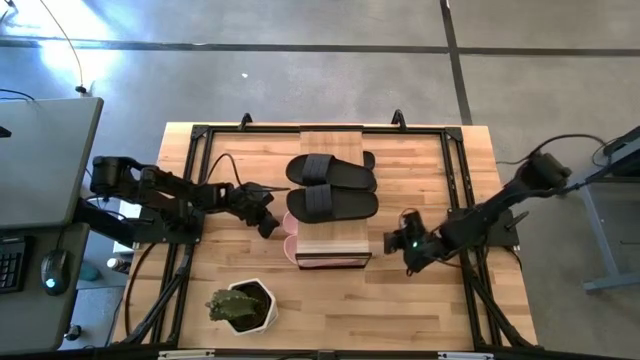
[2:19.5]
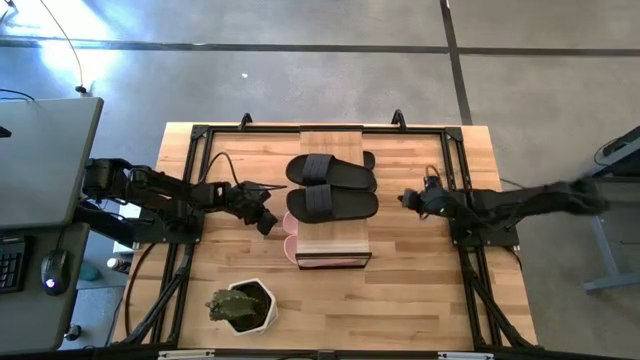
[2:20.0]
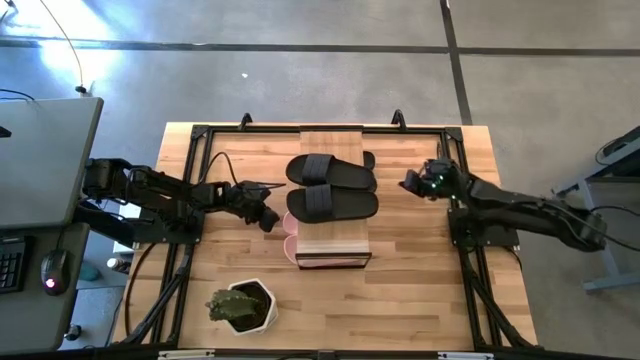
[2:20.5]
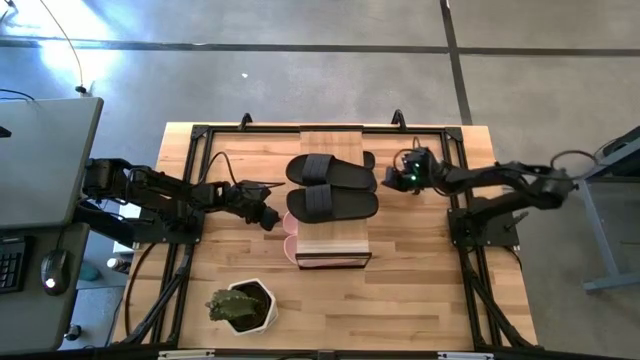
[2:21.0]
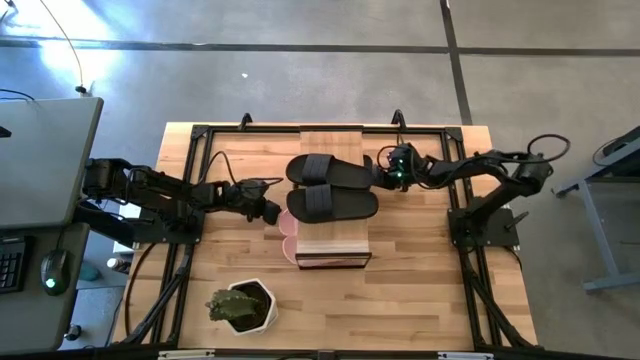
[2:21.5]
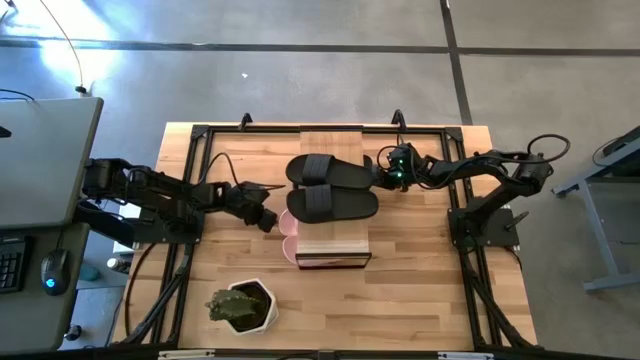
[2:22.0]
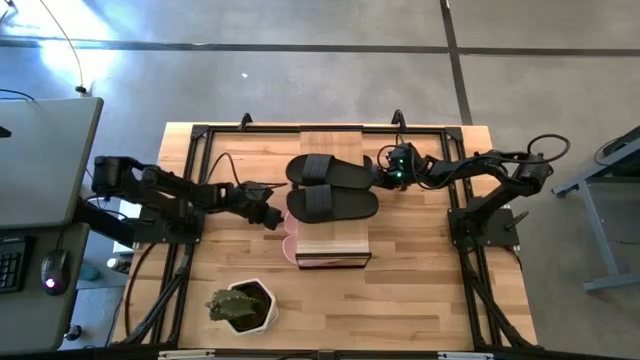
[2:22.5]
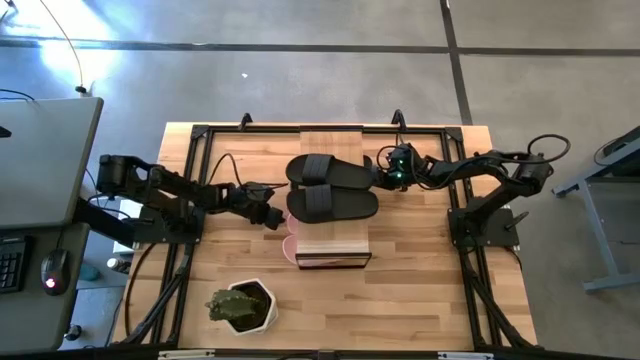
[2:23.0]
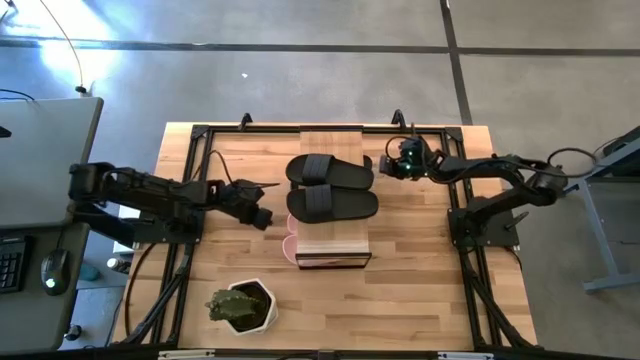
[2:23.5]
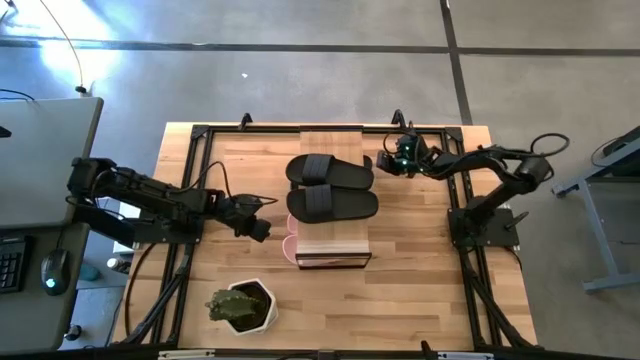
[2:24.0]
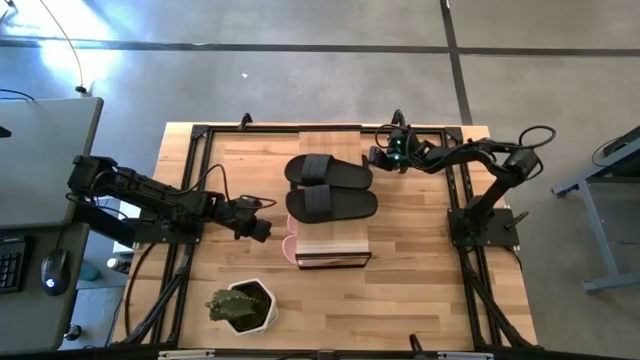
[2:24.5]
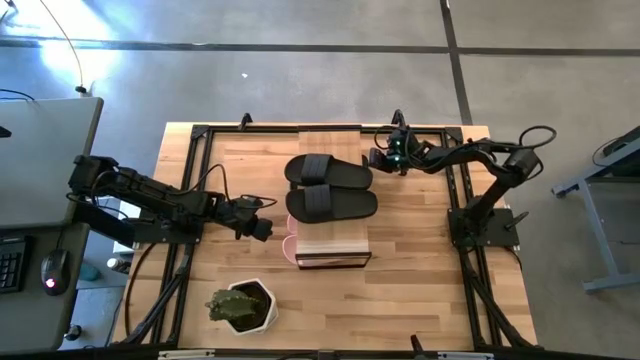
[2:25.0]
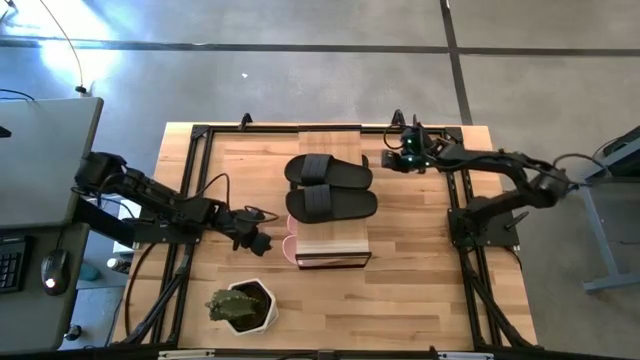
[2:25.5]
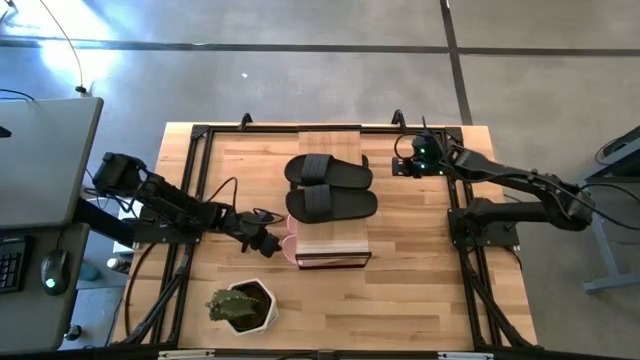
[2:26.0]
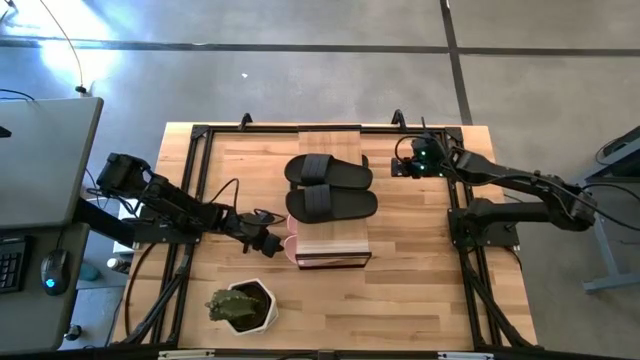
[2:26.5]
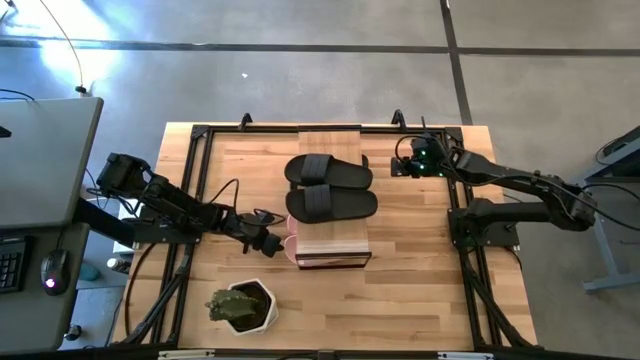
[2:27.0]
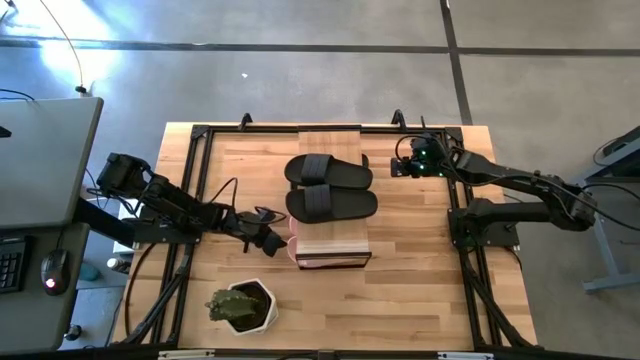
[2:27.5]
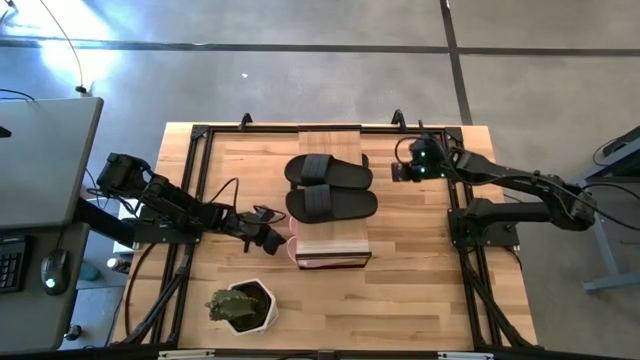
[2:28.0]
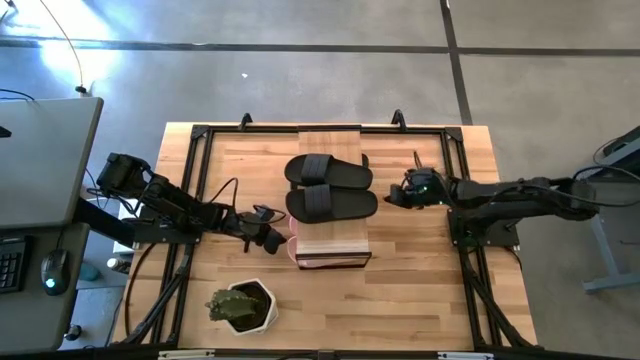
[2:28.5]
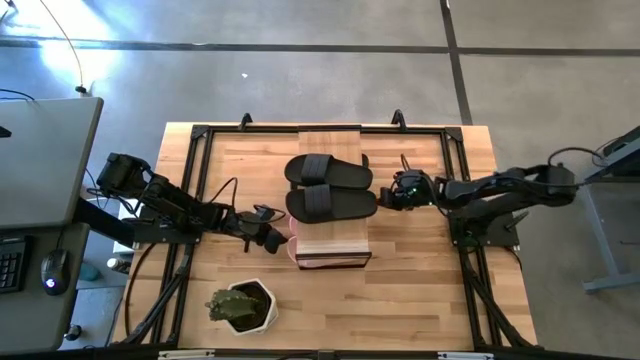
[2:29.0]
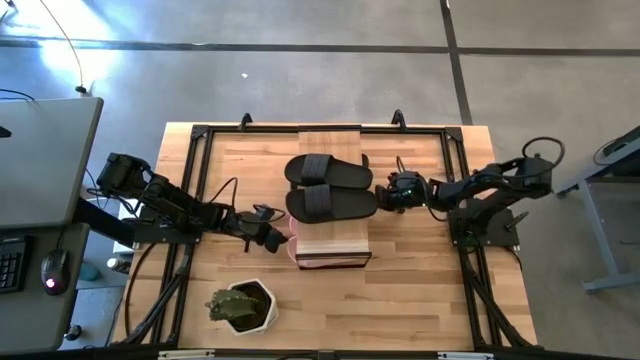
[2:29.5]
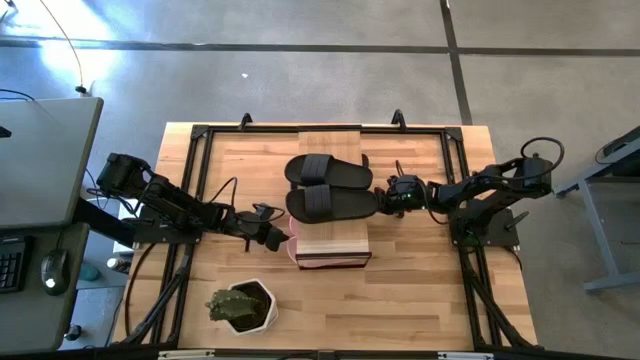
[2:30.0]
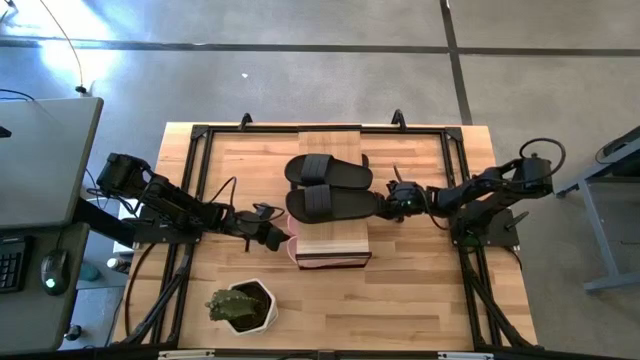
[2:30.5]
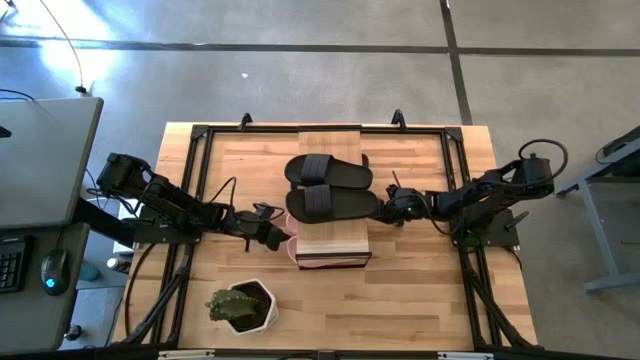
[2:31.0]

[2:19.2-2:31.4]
Task: Pick and place slides into the shelf
Adjust the slippers under the shelf

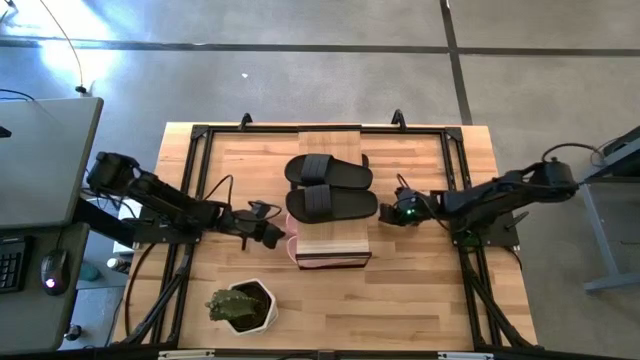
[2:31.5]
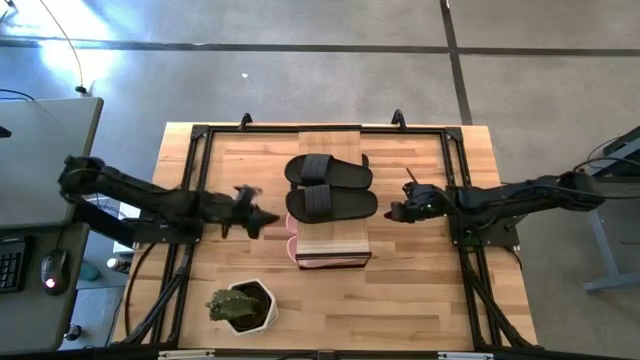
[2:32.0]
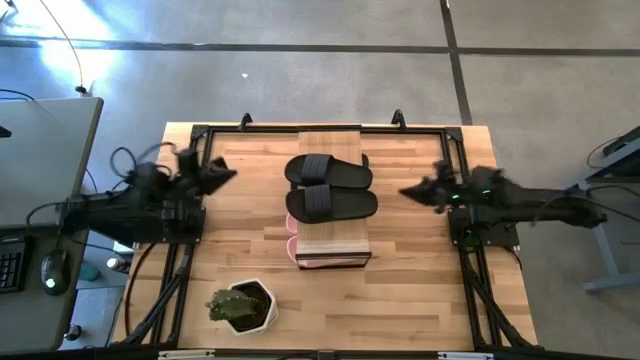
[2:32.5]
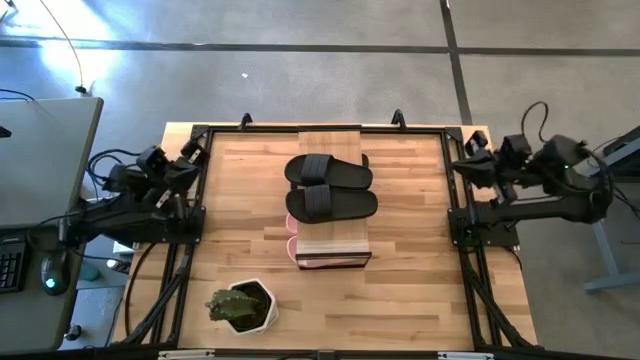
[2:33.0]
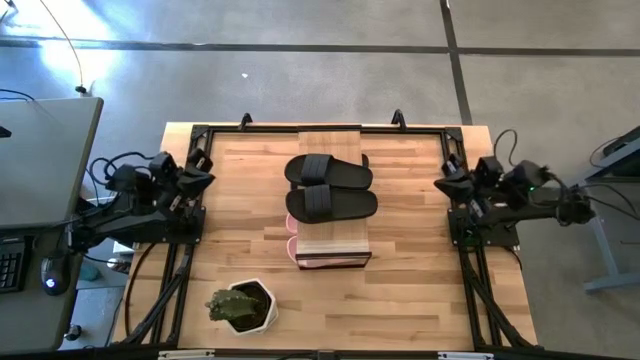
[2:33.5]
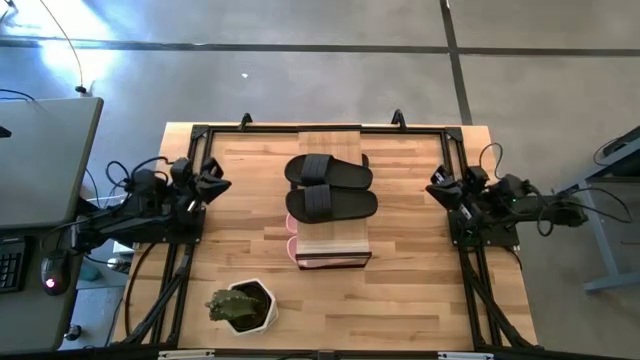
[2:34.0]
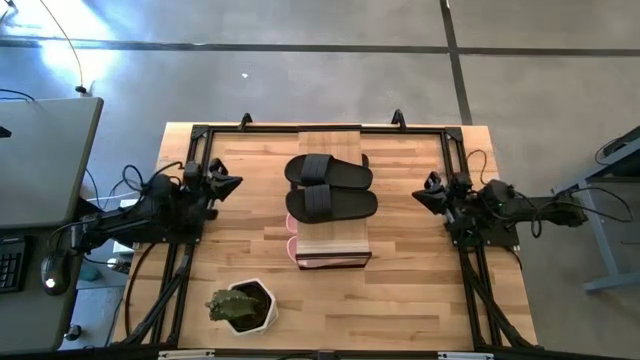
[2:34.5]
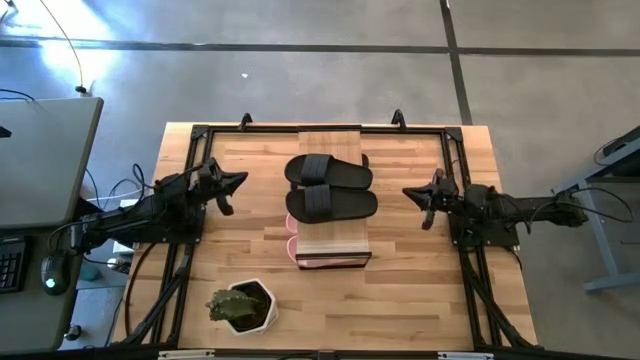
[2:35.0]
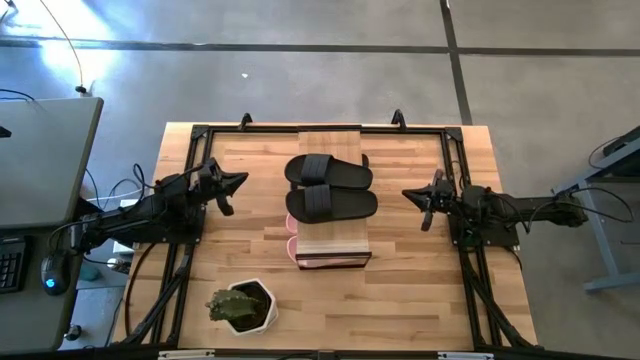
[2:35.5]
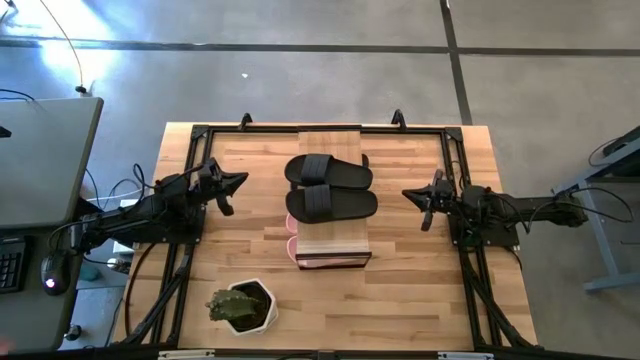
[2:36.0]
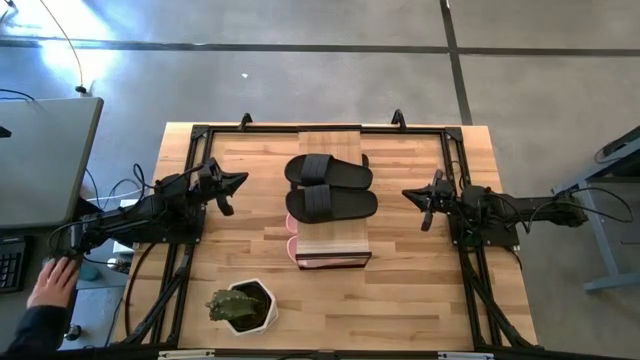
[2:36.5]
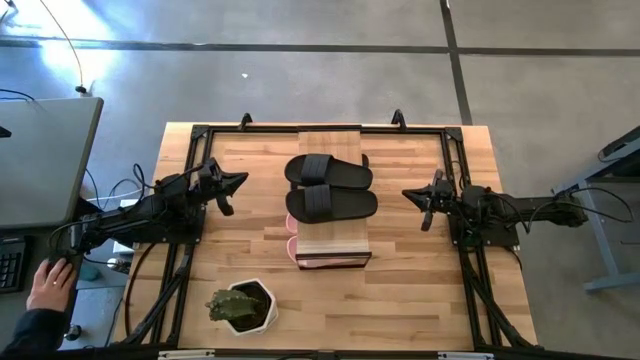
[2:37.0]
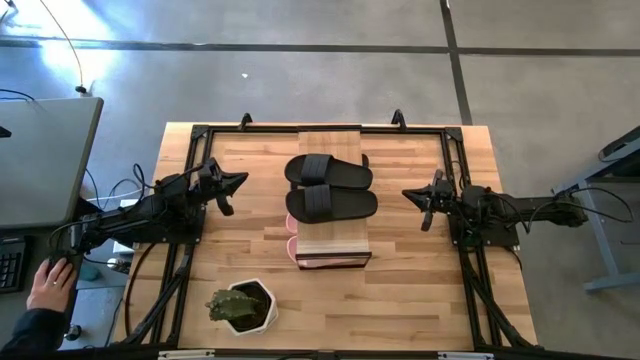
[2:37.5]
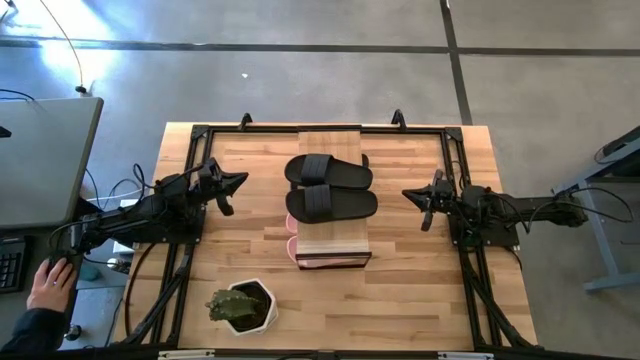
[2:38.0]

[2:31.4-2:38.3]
Return to Home Position

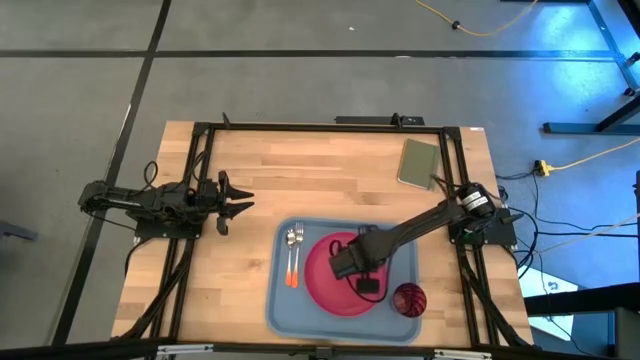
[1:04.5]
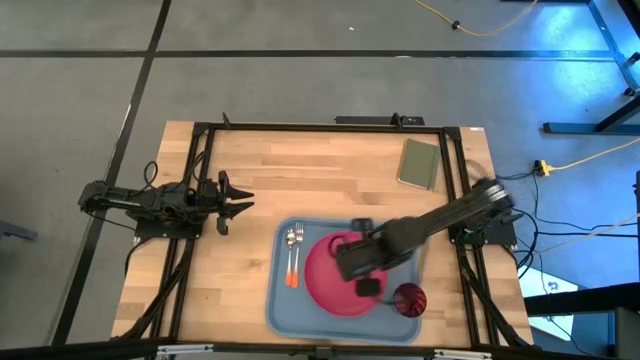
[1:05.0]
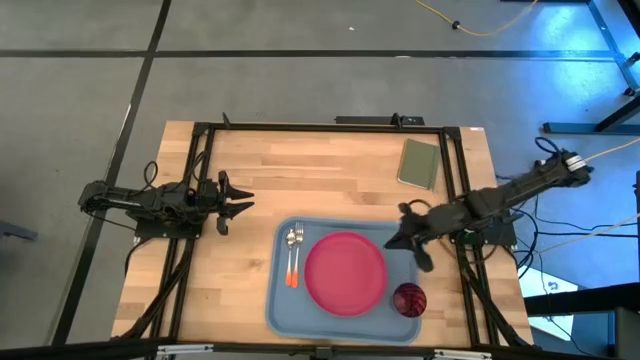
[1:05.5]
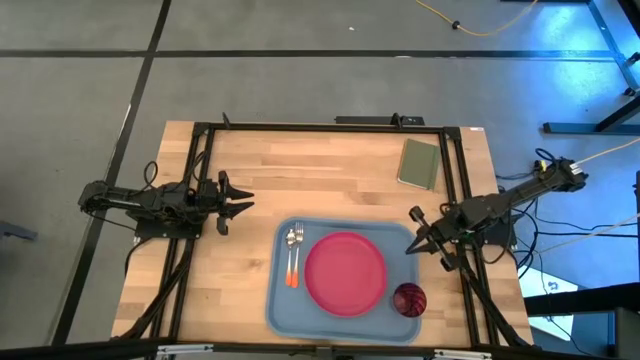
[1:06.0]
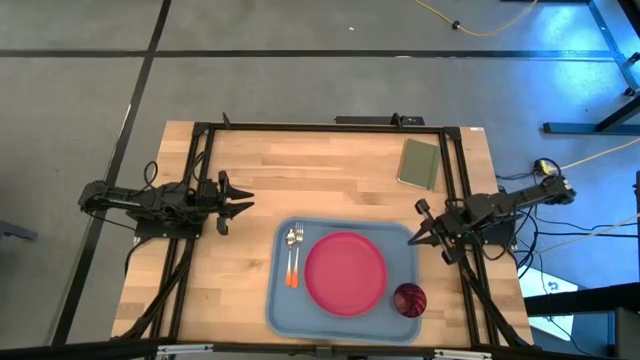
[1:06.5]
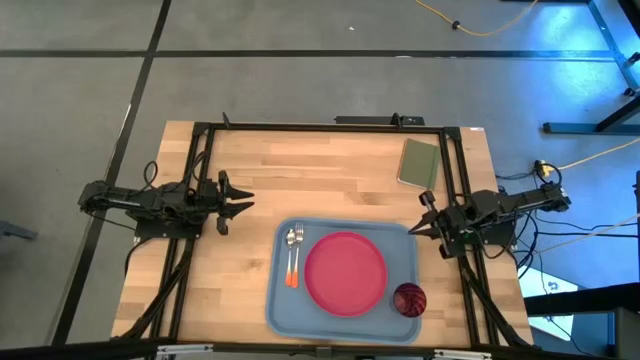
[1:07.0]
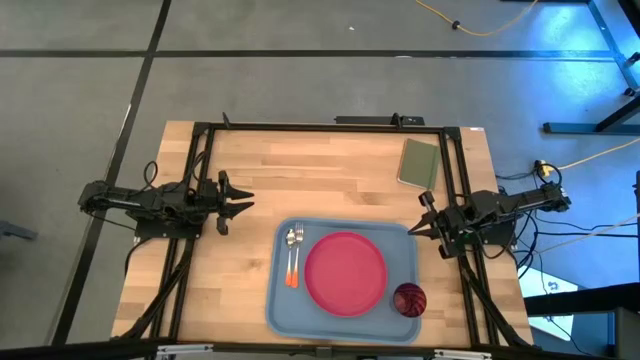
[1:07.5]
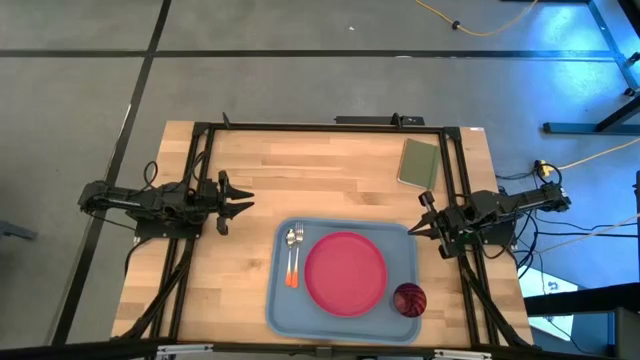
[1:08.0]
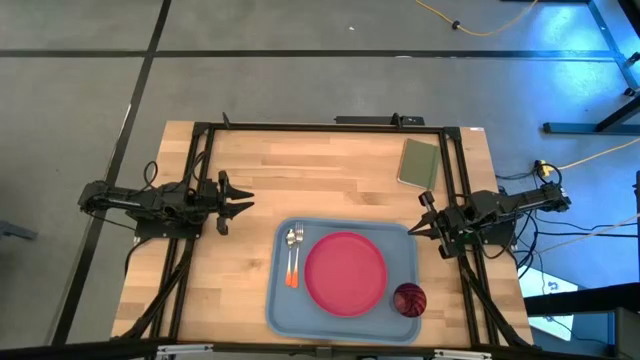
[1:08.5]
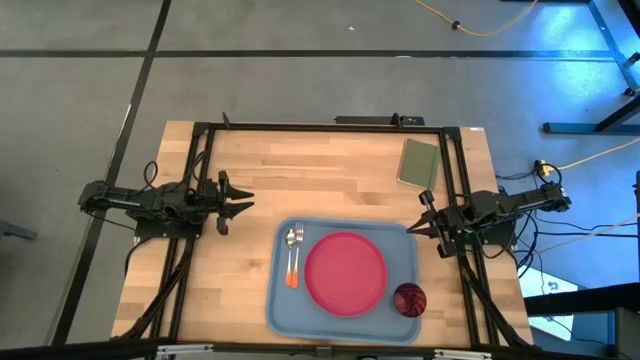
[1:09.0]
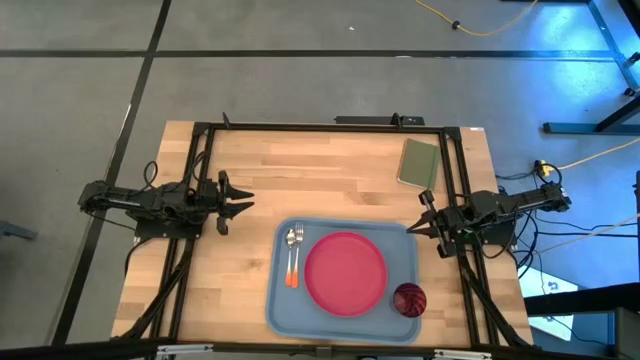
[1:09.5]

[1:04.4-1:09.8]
Task: Pick and place plate/cup/fork/spoon on tray
Return to Home Position
